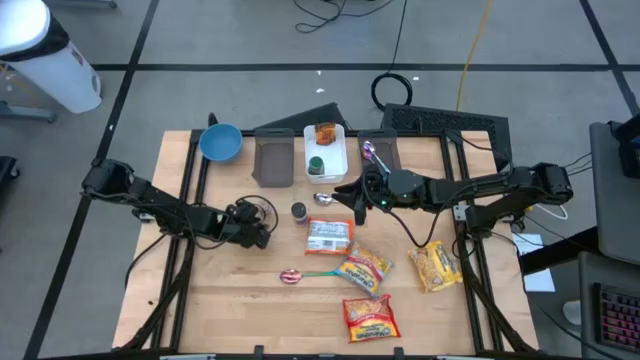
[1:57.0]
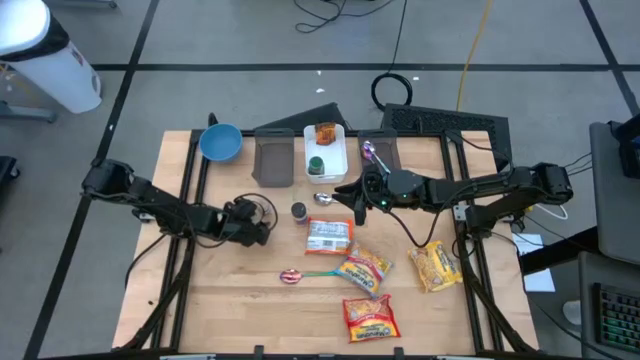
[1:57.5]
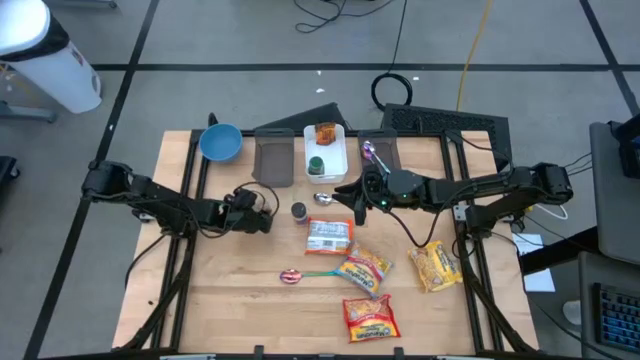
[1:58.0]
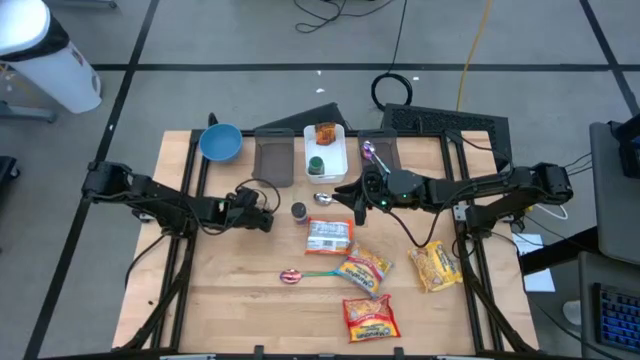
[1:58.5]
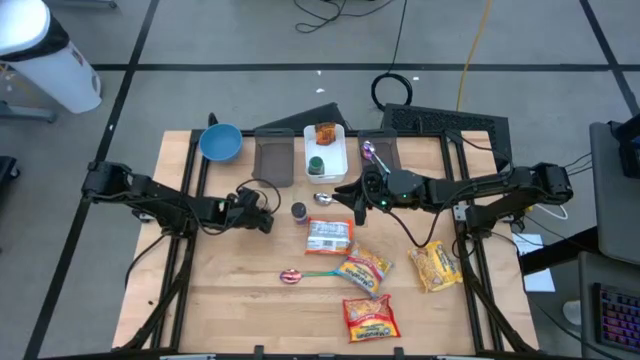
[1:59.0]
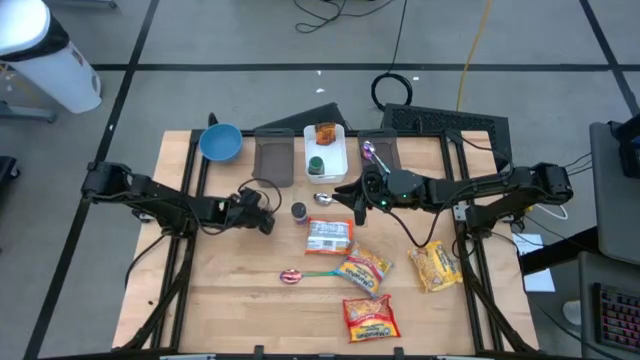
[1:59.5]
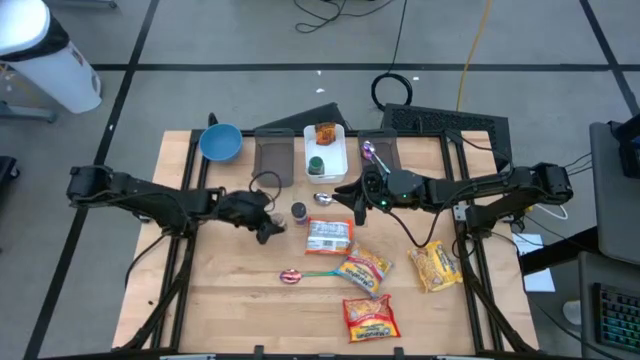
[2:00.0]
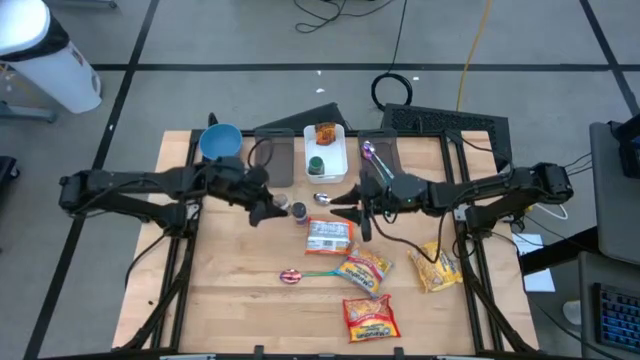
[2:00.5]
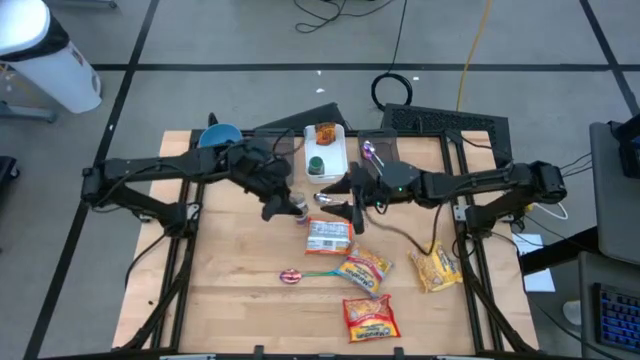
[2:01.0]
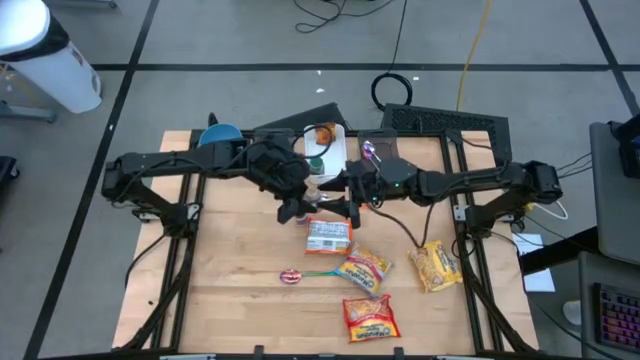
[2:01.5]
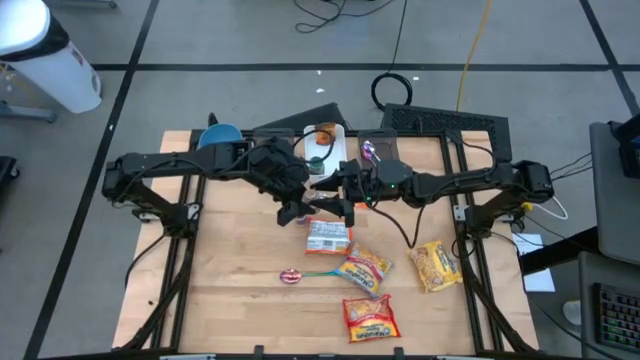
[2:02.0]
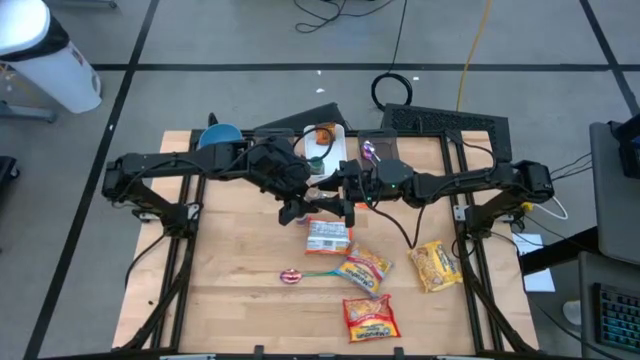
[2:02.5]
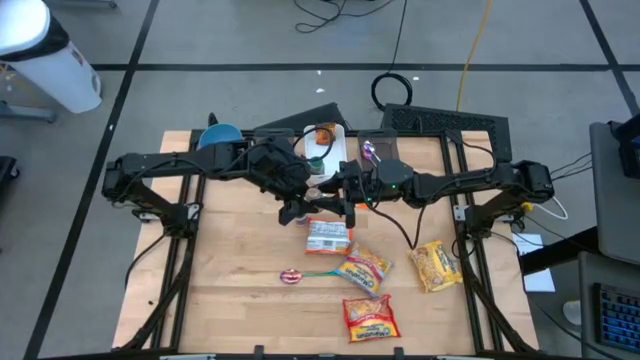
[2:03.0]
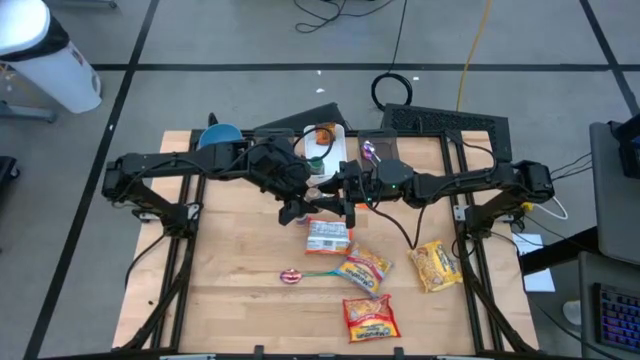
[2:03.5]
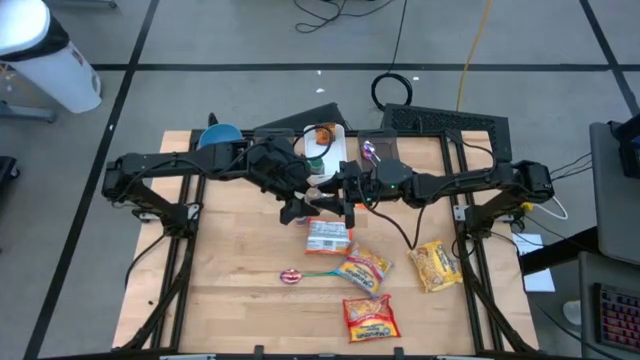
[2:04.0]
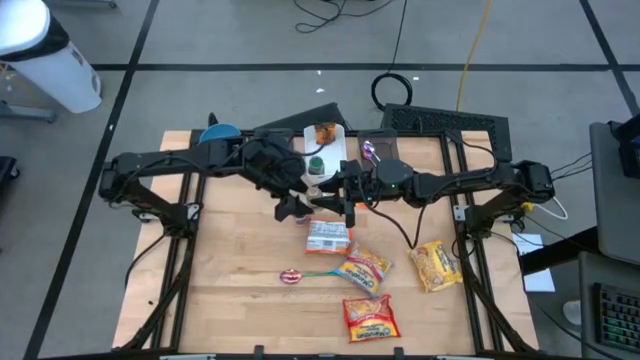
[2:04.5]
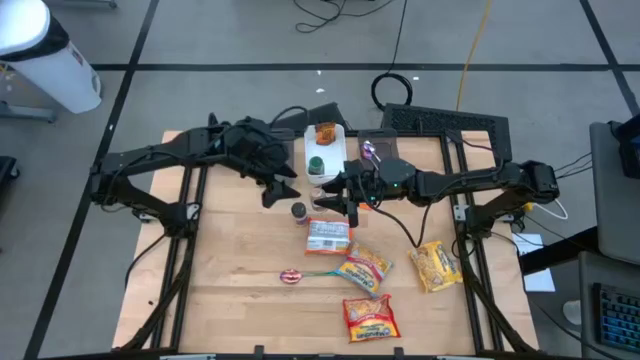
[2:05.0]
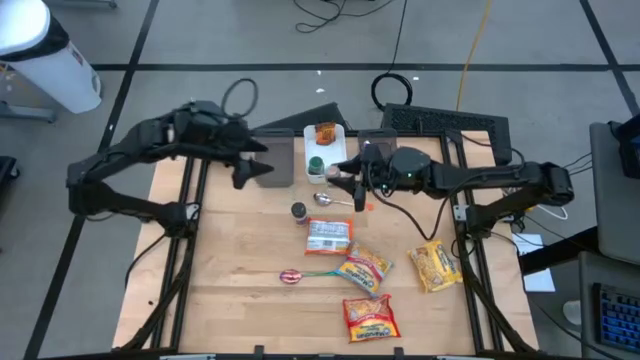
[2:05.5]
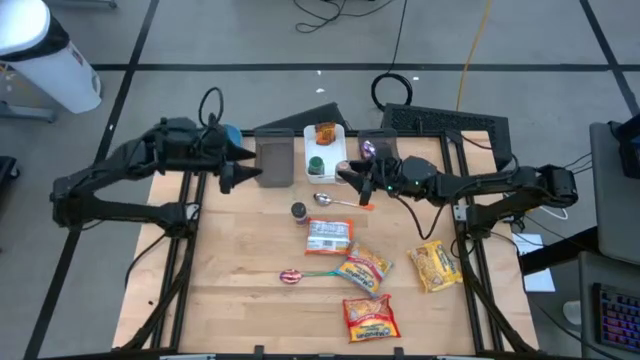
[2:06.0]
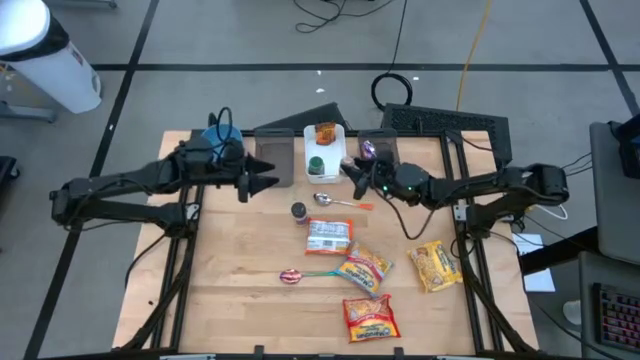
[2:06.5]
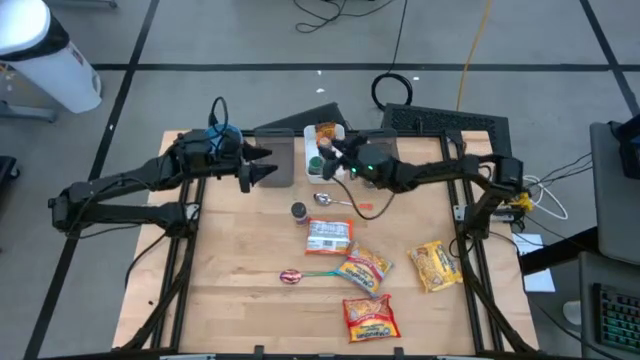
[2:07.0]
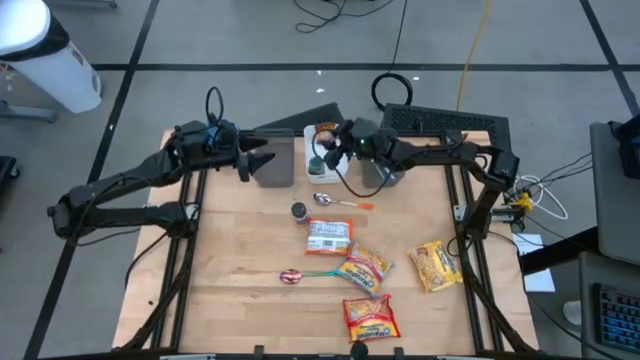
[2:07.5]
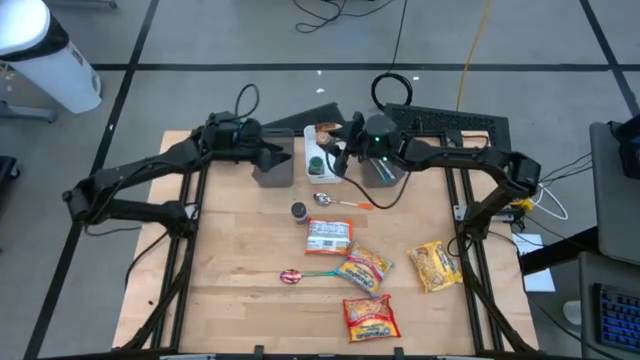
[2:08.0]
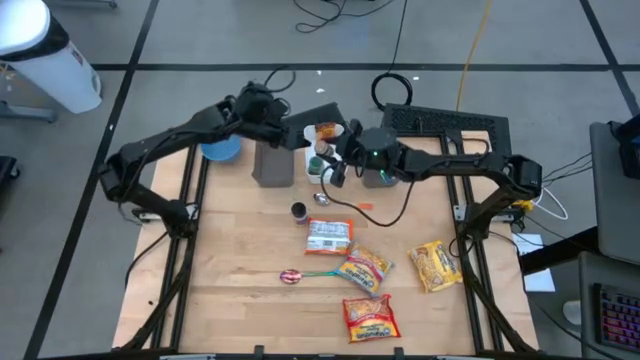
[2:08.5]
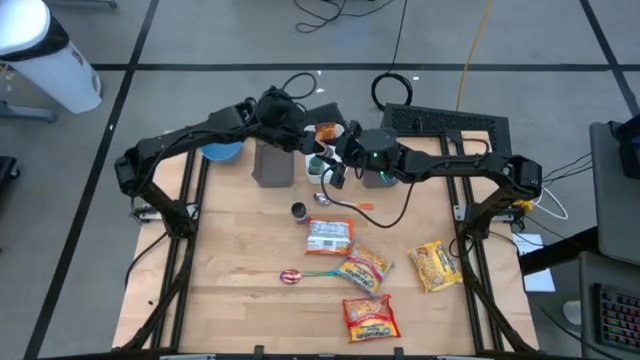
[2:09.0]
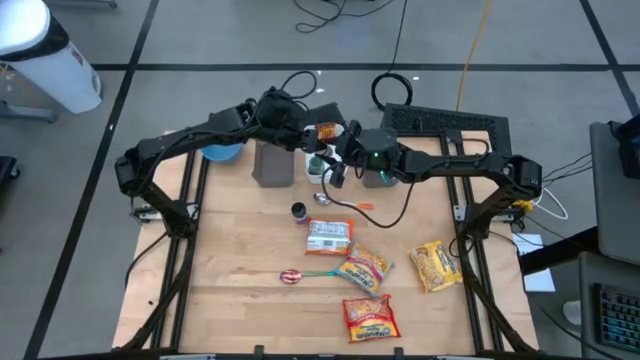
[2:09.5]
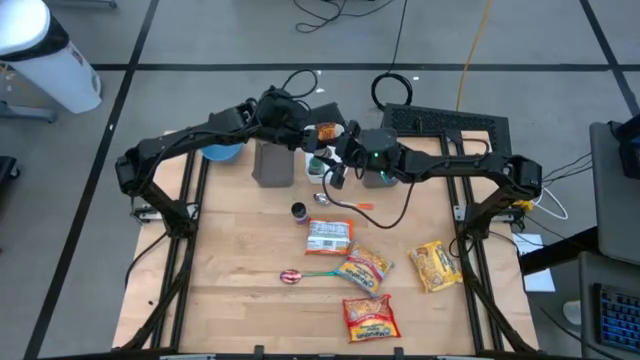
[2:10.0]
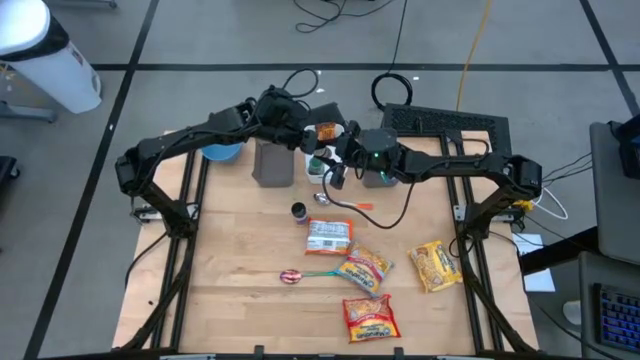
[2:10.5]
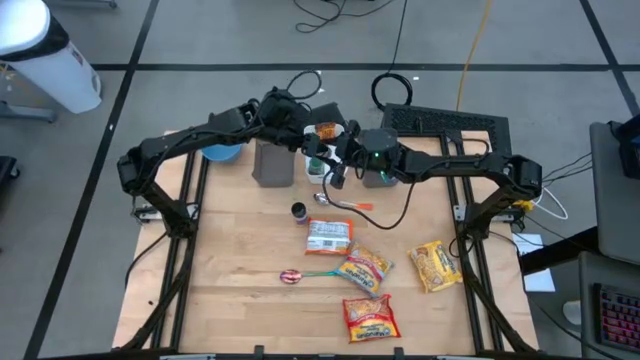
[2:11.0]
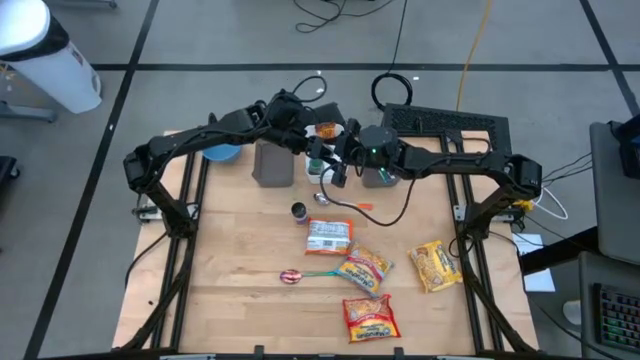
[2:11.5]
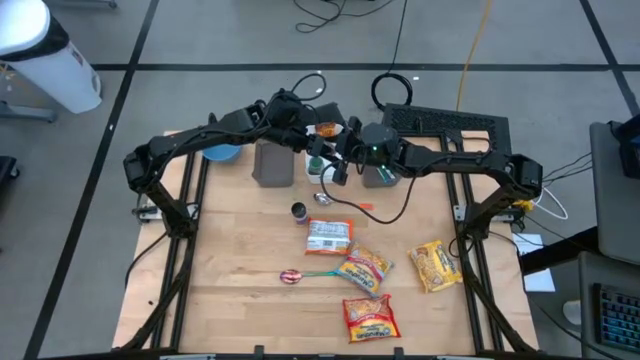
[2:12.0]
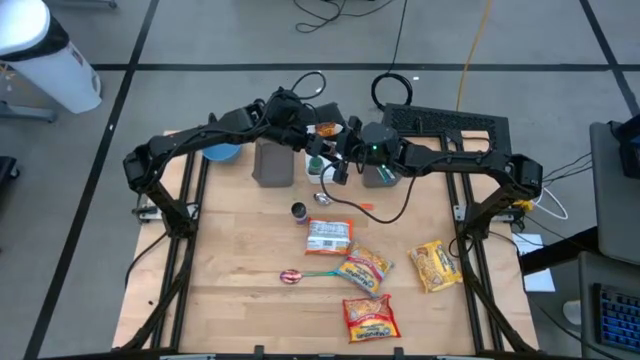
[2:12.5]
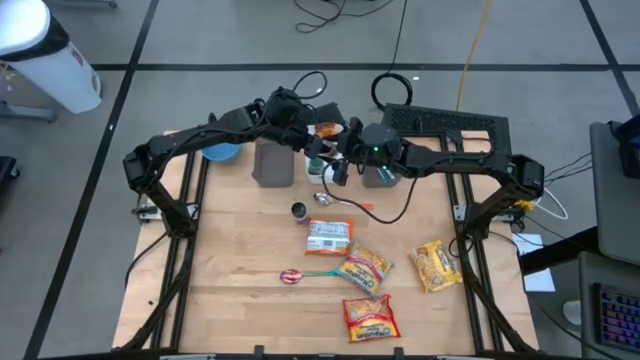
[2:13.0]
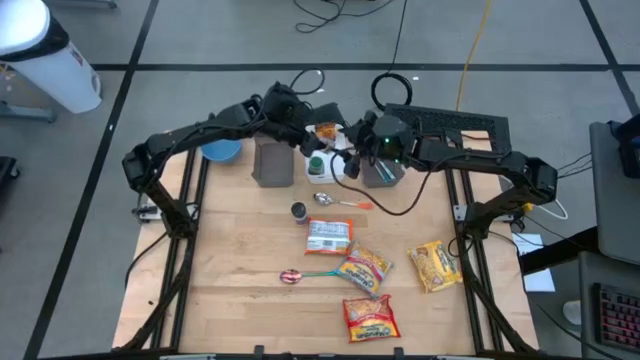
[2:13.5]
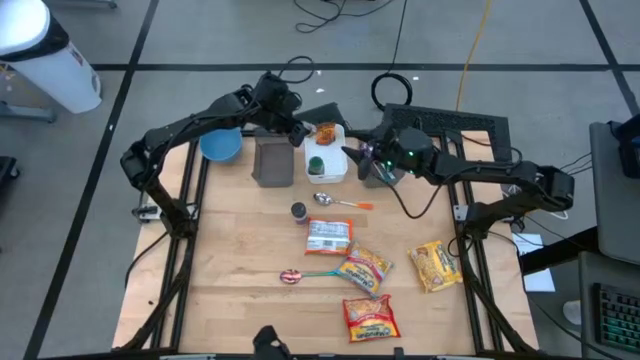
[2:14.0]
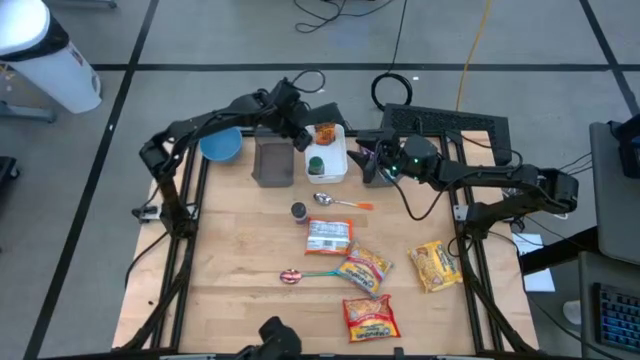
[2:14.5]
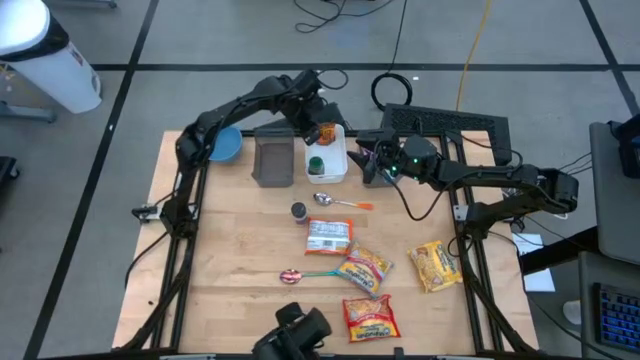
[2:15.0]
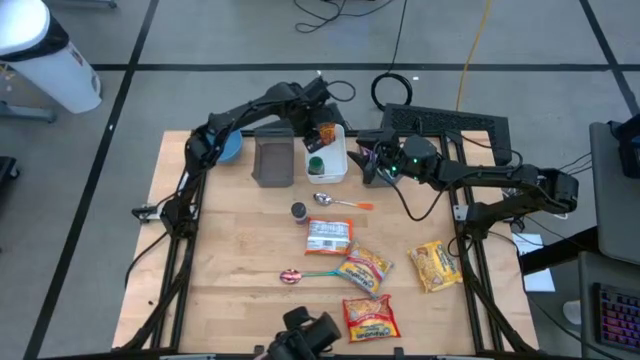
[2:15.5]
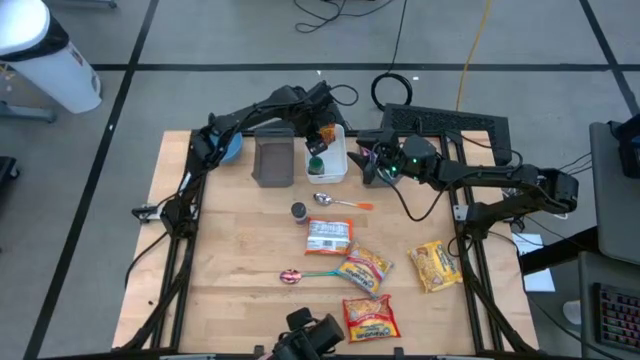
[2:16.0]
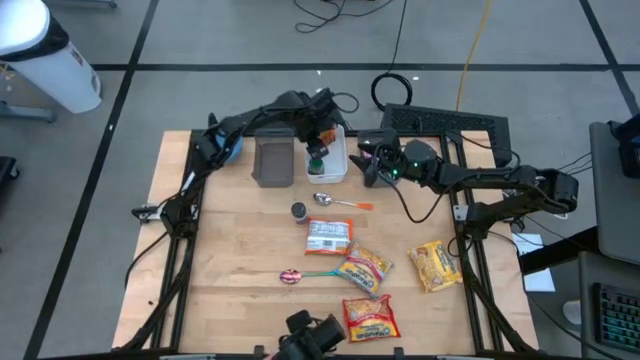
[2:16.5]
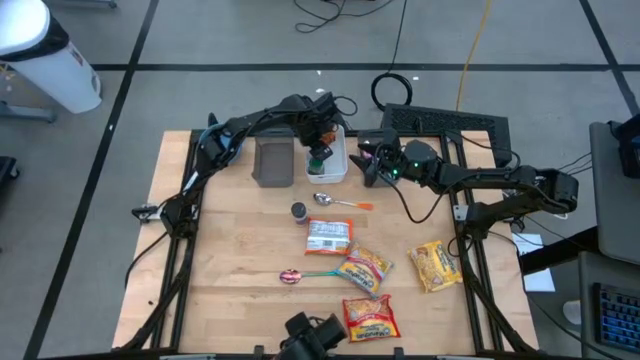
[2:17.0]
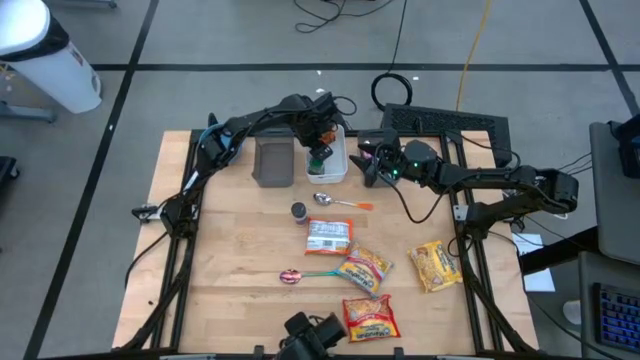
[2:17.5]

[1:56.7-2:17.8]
Task: Pick & Place Food Item
Put the brown seasoning bottle into the white bin
